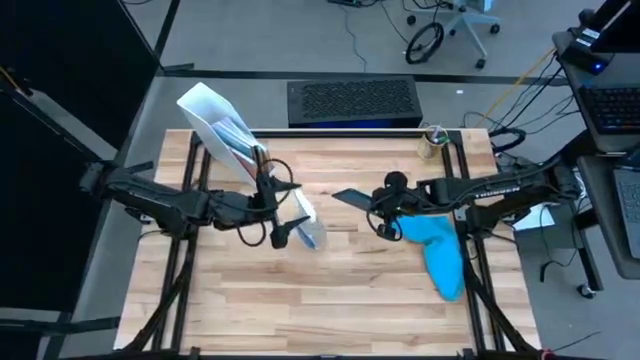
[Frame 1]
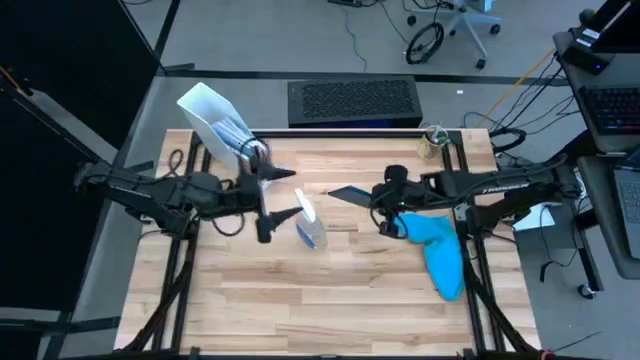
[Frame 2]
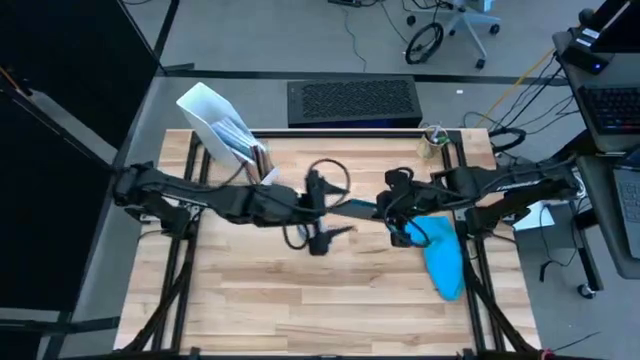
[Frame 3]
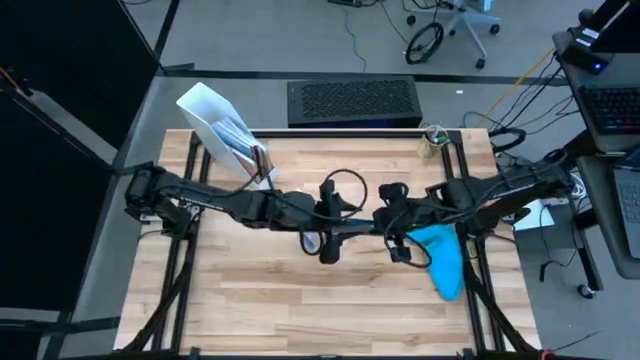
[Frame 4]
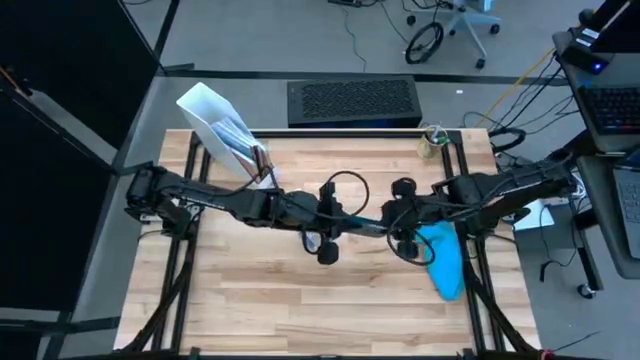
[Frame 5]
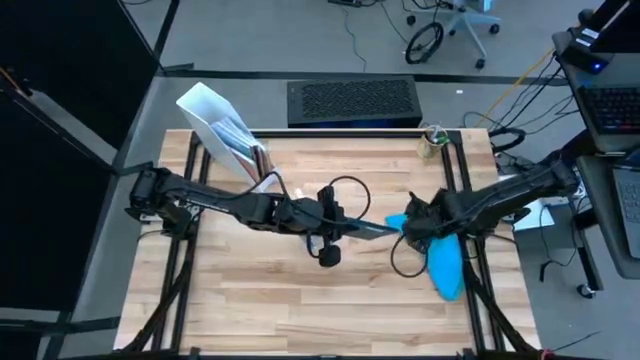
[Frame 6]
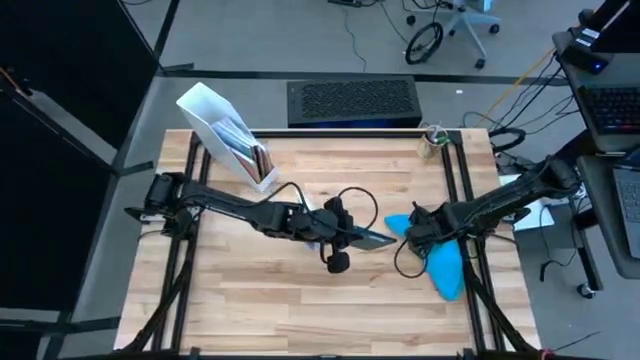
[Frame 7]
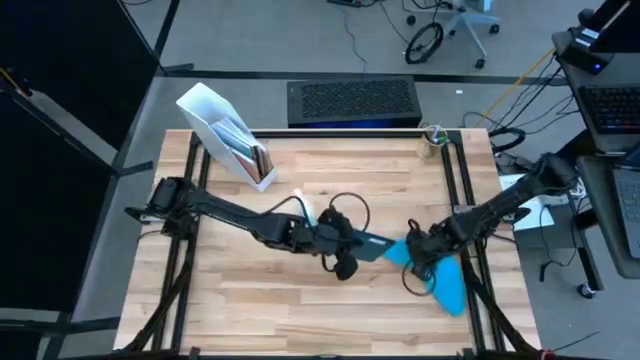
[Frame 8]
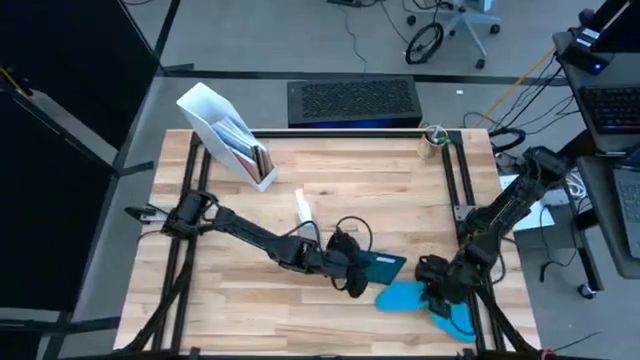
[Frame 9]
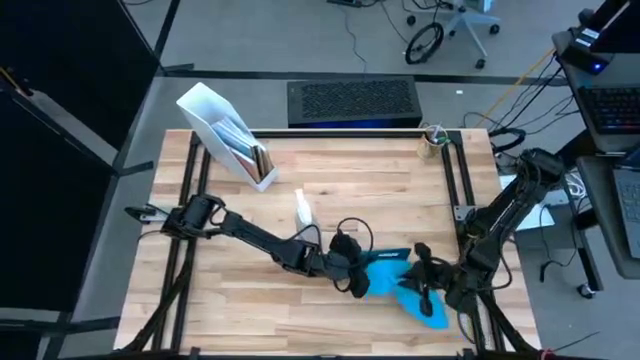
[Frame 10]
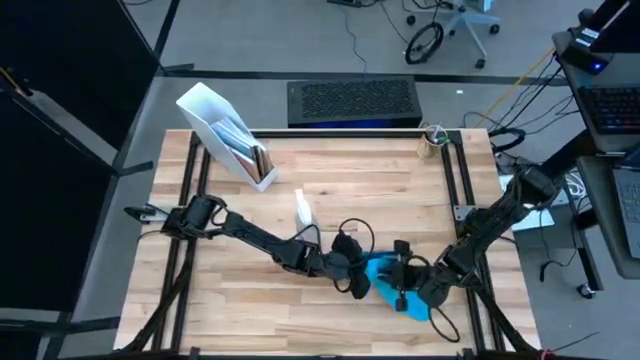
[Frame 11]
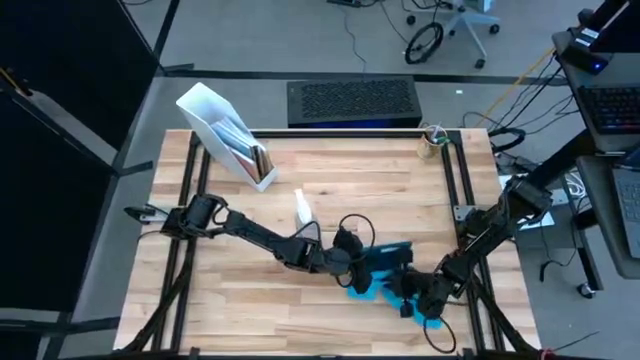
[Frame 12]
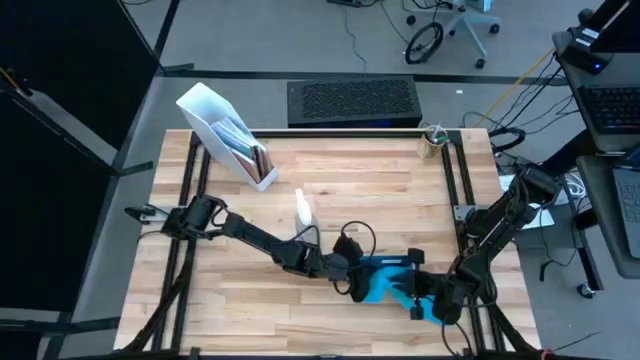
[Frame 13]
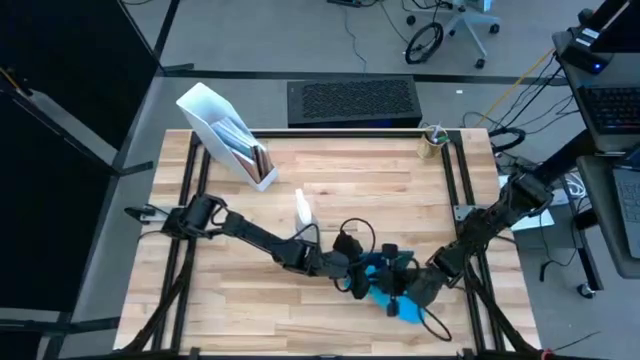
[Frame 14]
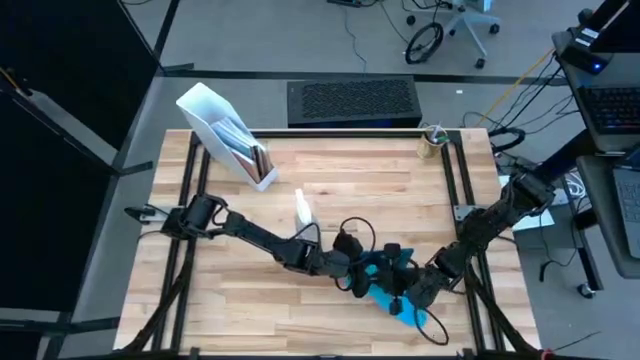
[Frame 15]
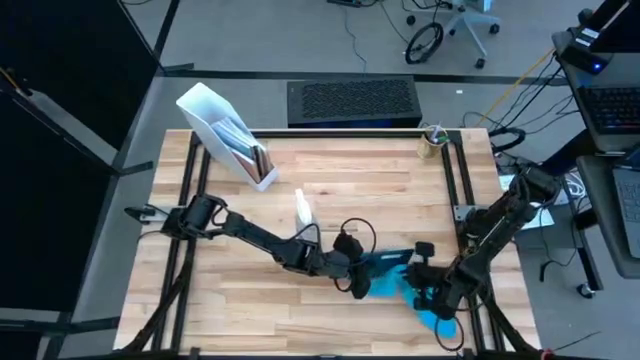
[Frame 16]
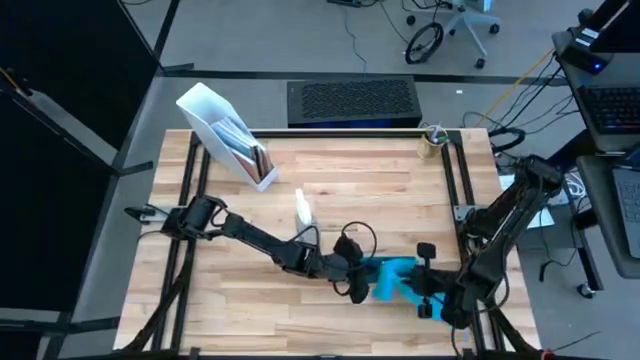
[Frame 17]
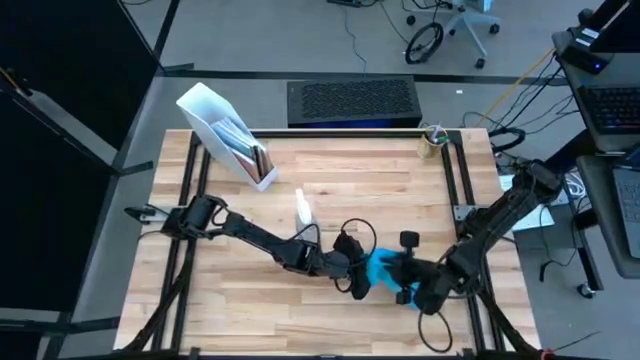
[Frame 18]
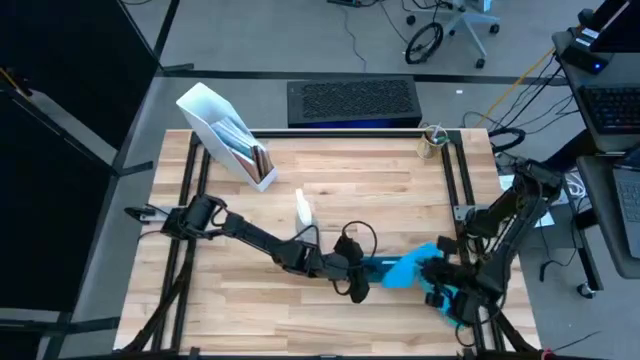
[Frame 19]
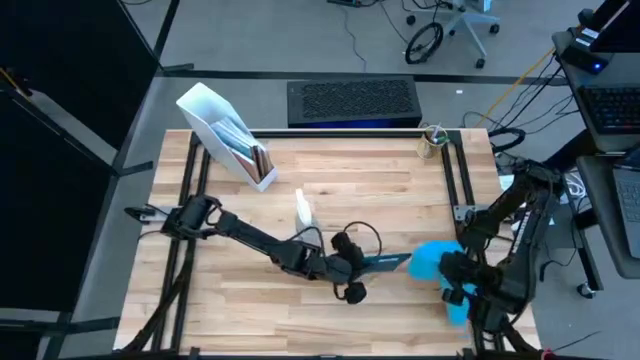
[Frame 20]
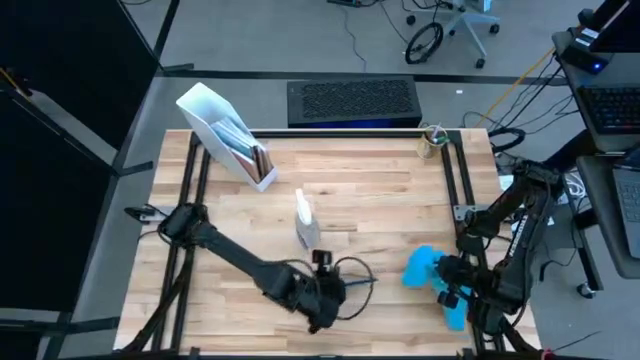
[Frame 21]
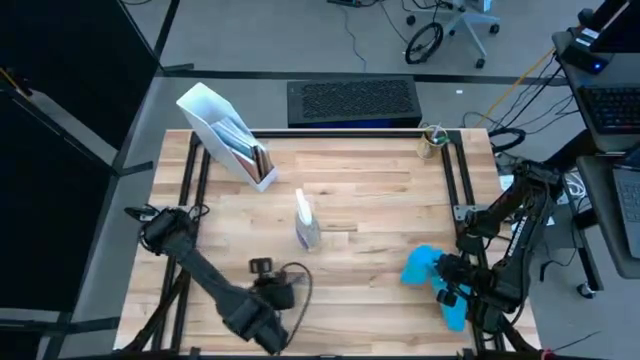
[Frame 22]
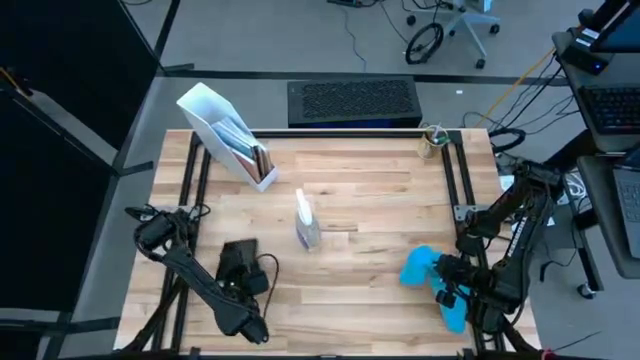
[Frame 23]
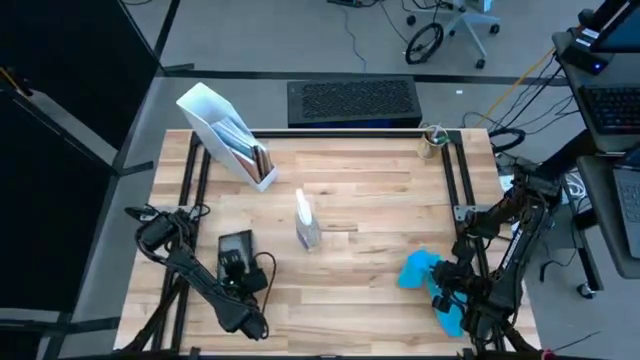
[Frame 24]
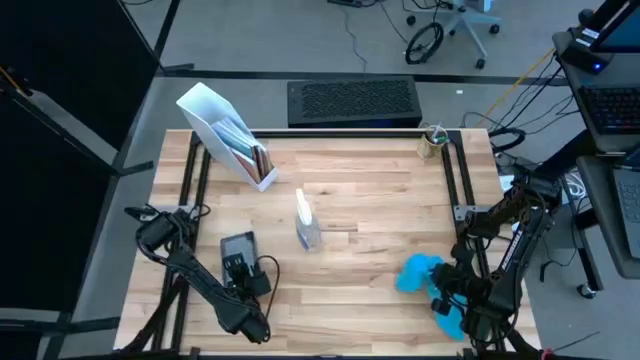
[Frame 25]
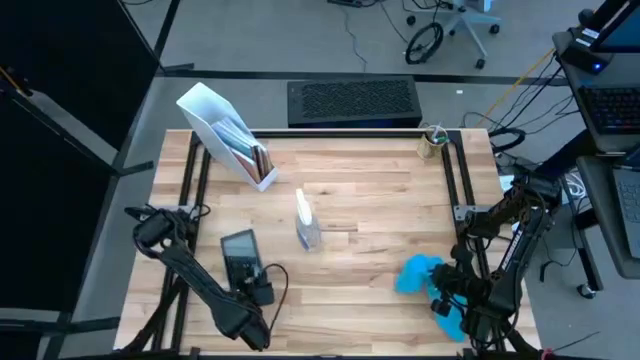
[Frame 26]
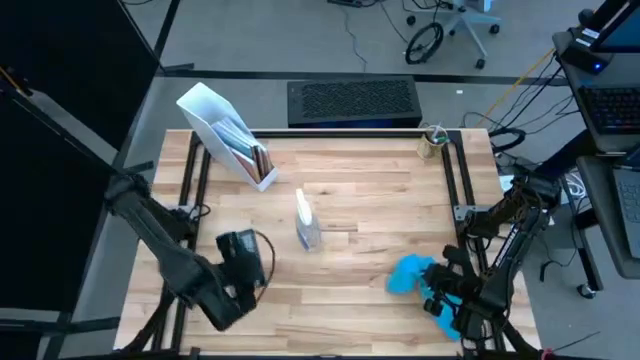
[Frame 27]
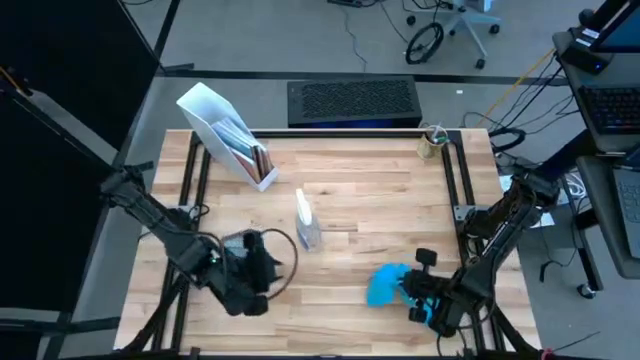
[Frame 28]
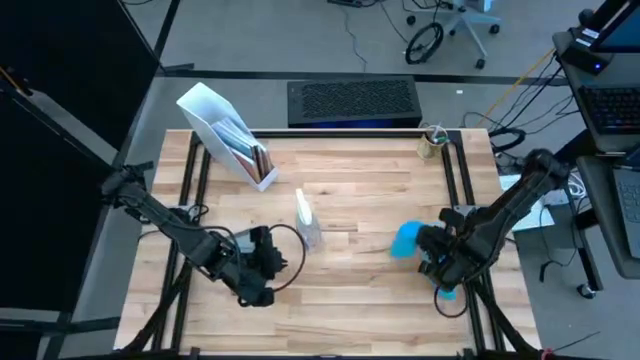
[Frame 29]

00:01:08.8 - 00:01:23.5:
Task: Apply microfiber cloth
Wipe the back of the tablet with the blue microfiber cloth

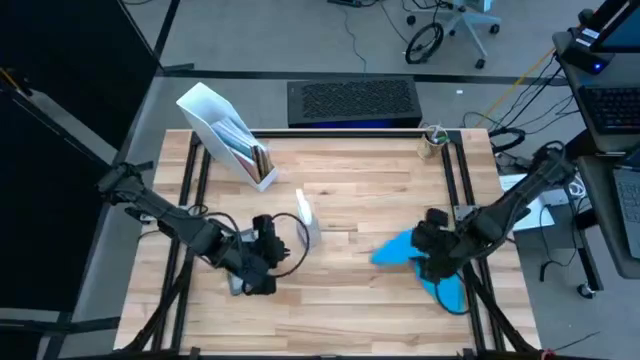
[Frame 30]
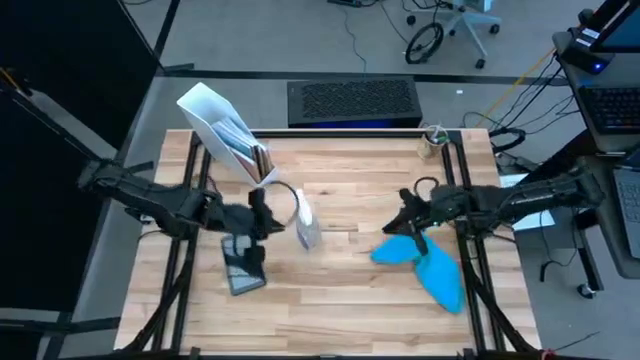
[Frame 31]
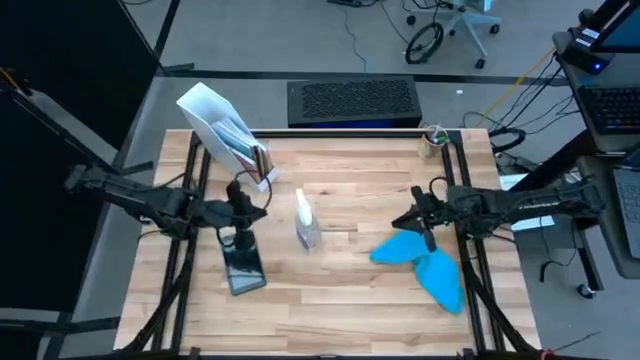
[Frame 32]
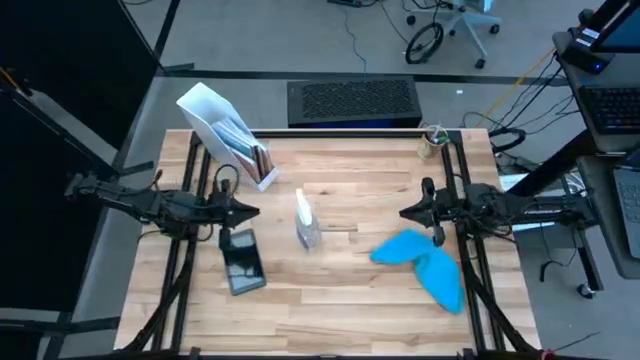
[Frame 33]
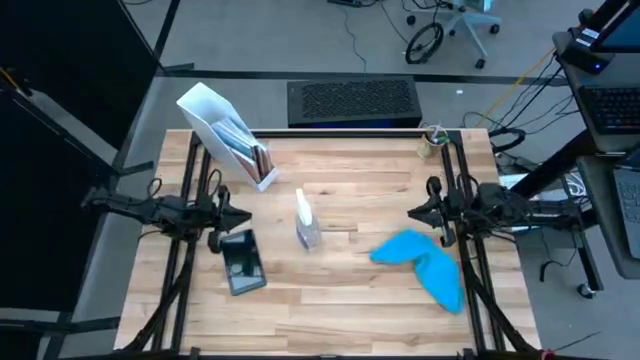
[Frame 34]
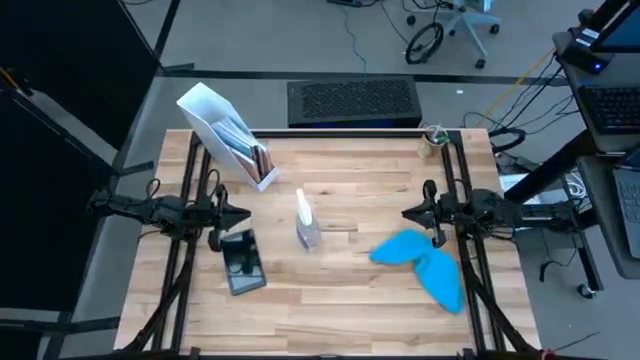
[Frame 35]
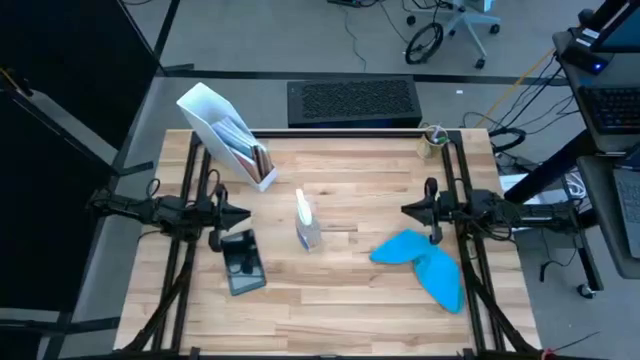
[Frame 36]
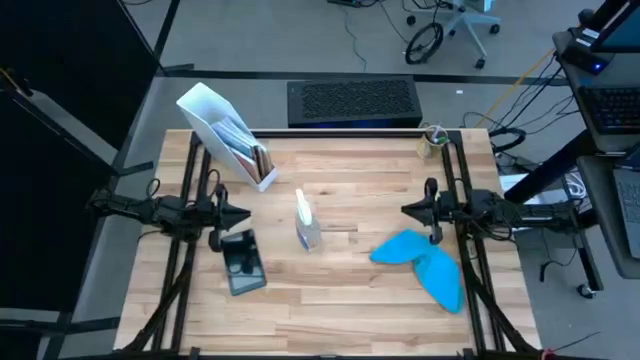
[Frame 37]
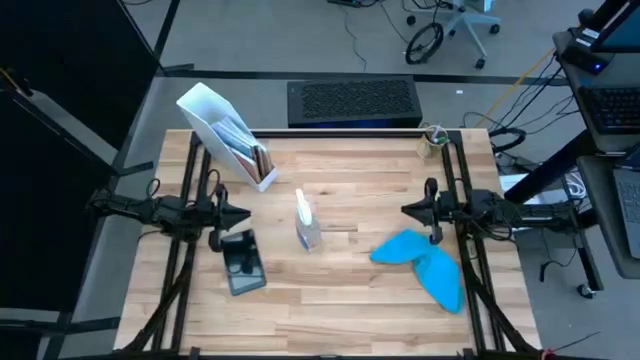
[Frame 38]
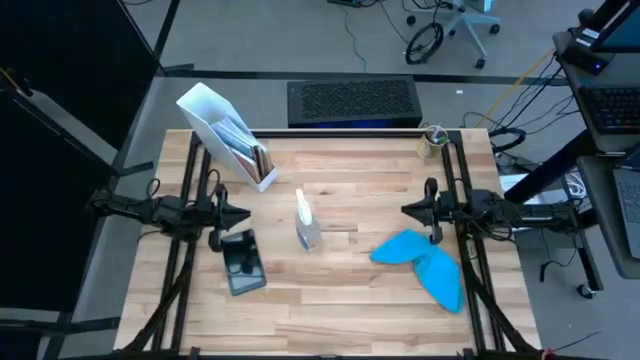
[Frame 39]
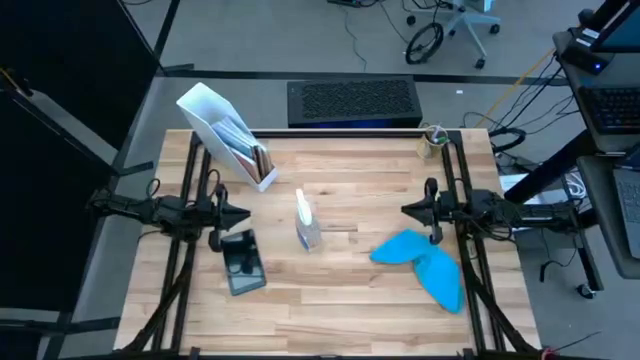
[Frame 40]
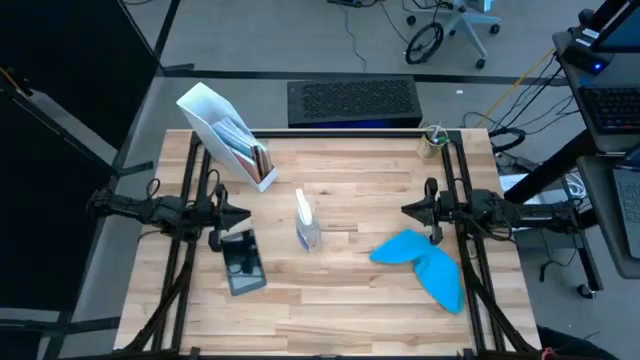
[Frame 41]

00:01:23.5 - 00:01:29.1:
Return to Home Position
